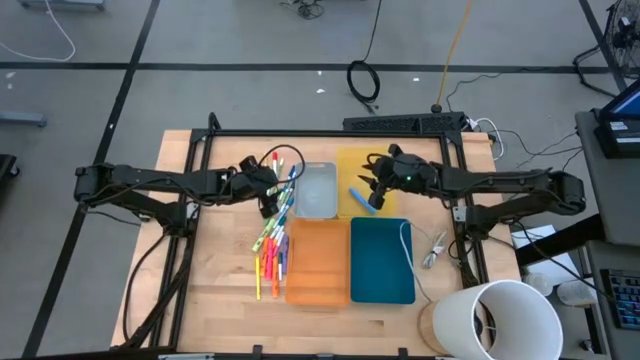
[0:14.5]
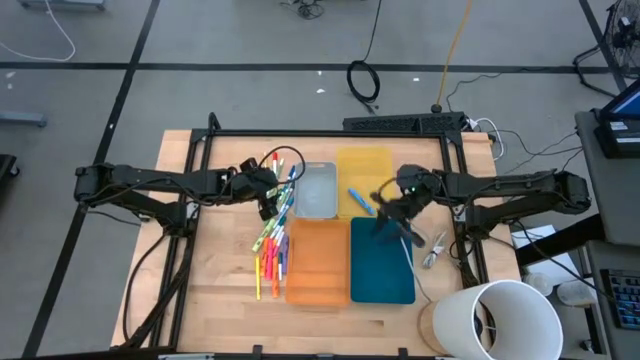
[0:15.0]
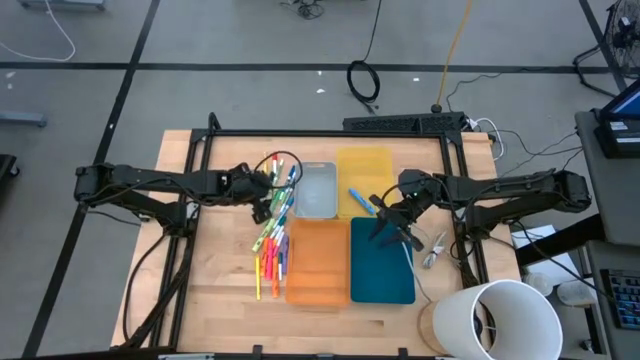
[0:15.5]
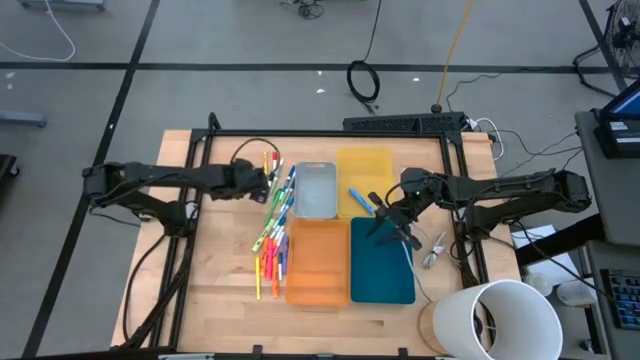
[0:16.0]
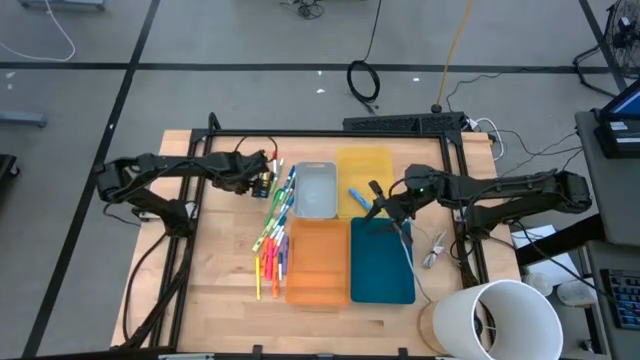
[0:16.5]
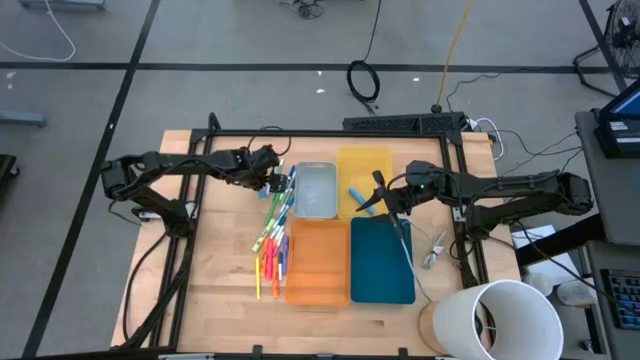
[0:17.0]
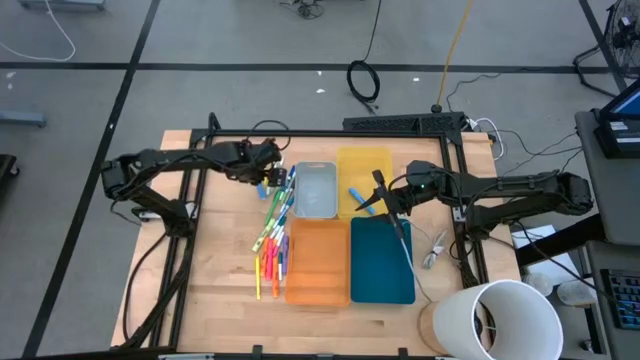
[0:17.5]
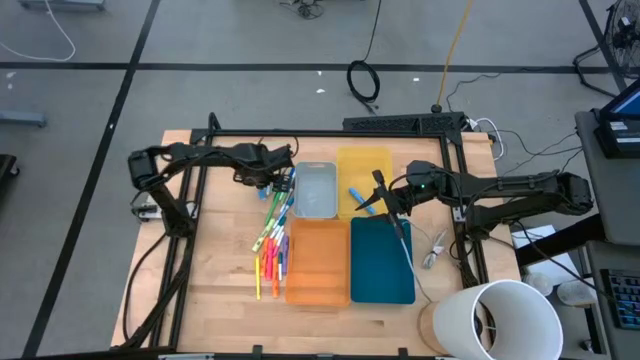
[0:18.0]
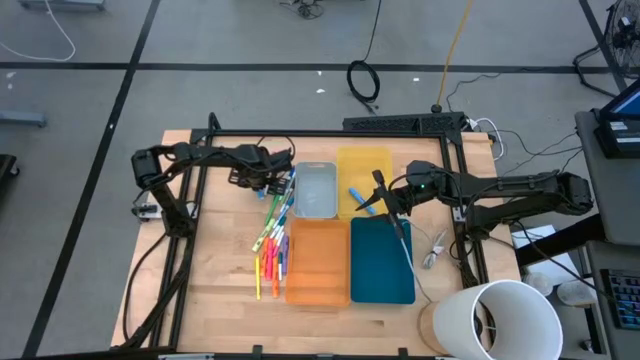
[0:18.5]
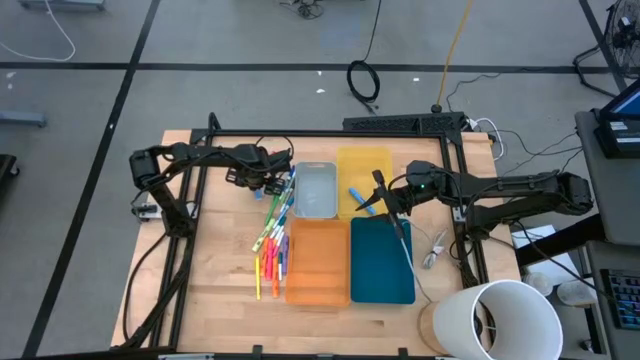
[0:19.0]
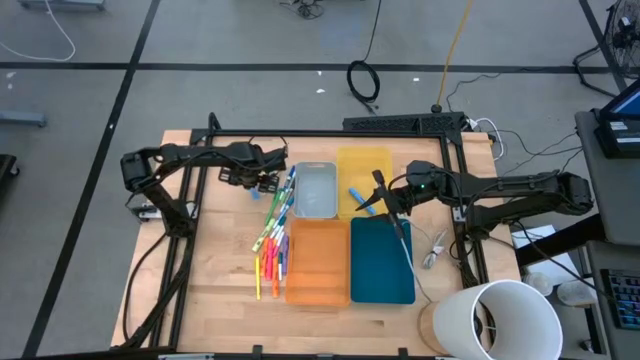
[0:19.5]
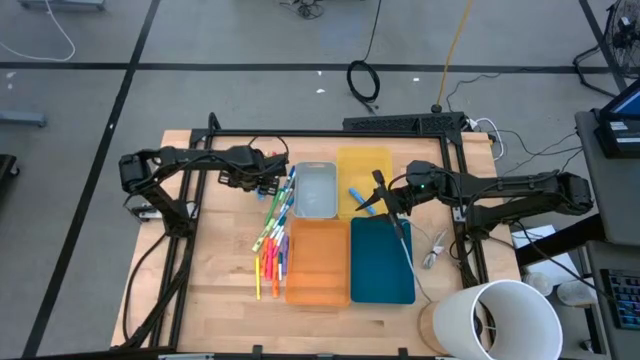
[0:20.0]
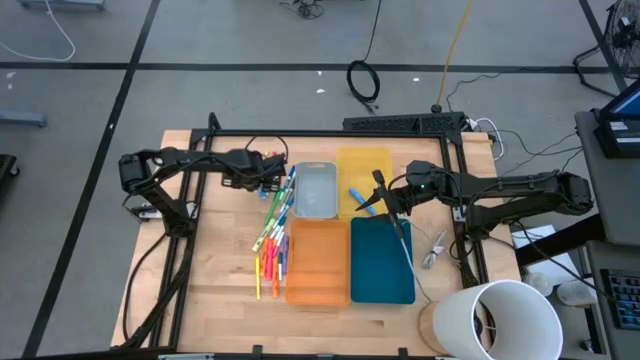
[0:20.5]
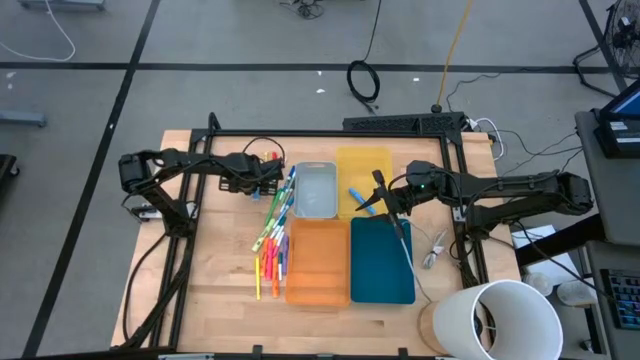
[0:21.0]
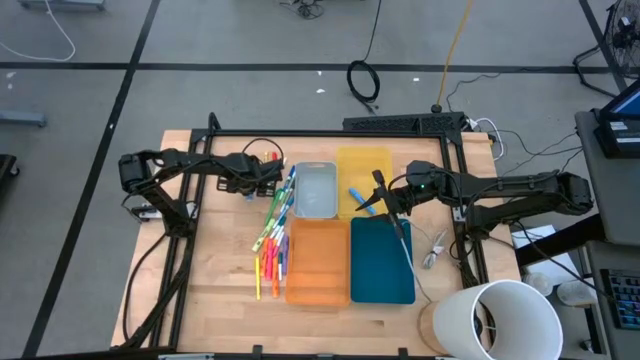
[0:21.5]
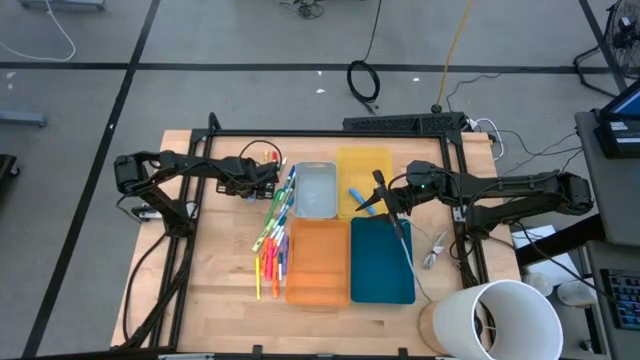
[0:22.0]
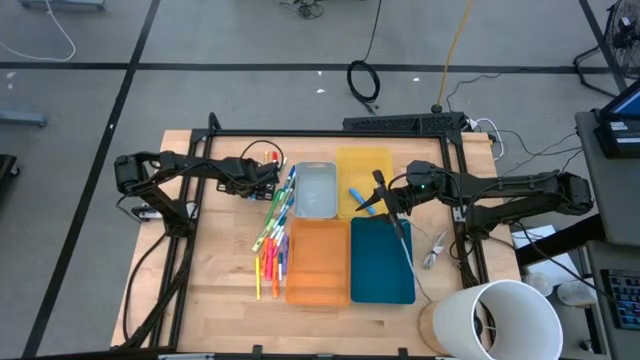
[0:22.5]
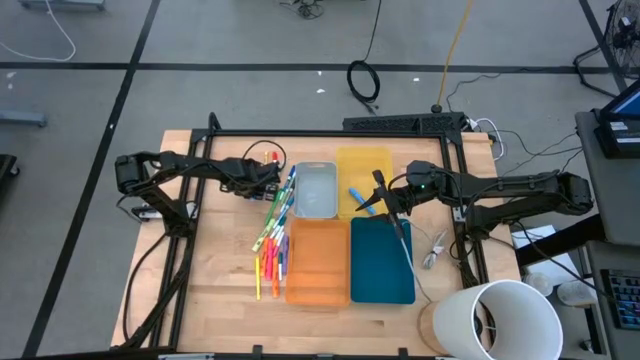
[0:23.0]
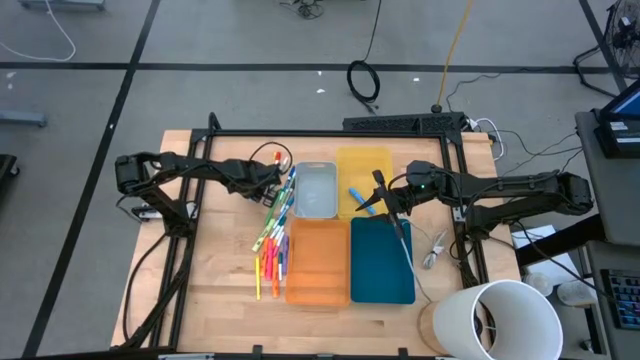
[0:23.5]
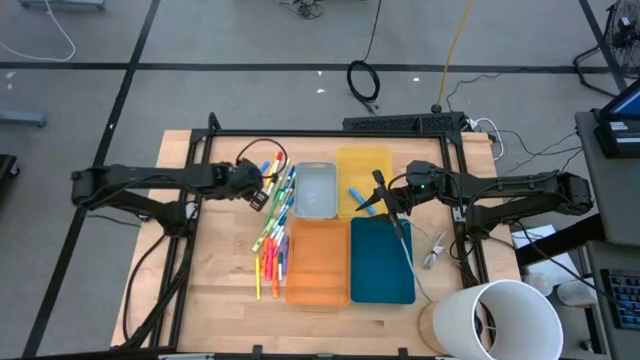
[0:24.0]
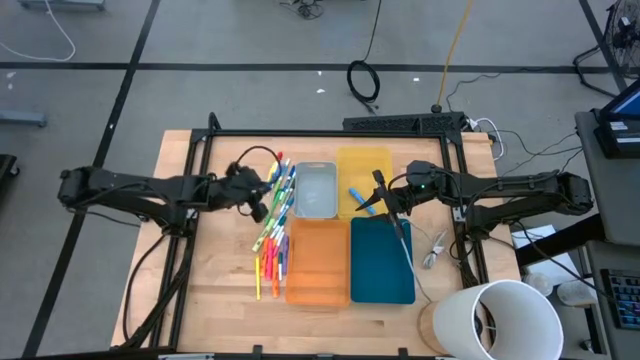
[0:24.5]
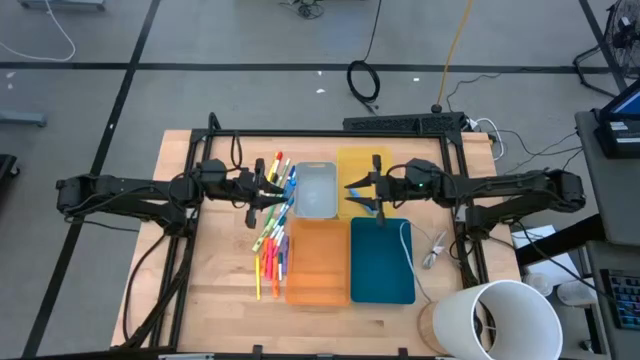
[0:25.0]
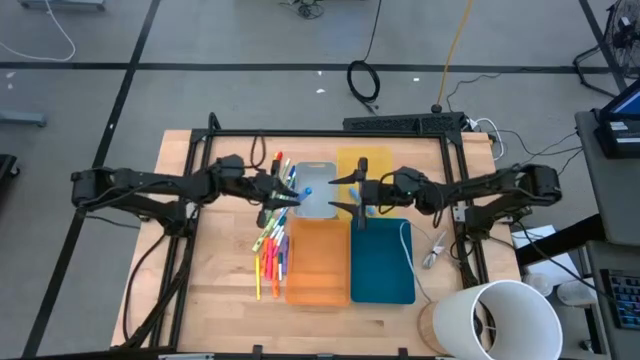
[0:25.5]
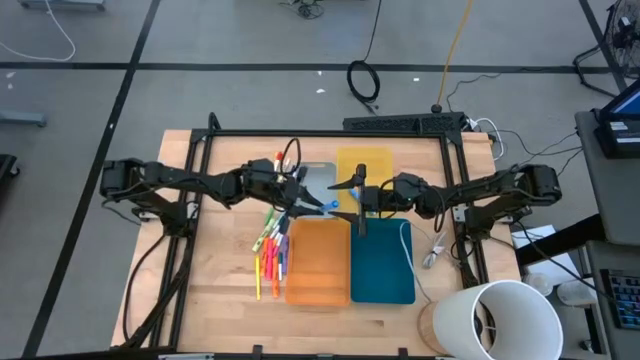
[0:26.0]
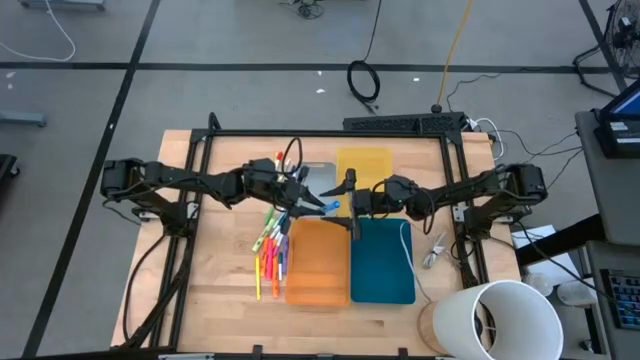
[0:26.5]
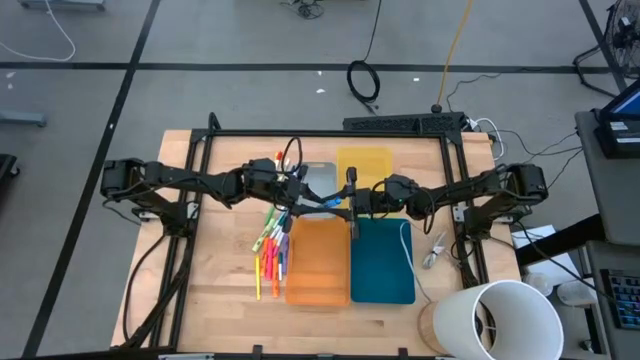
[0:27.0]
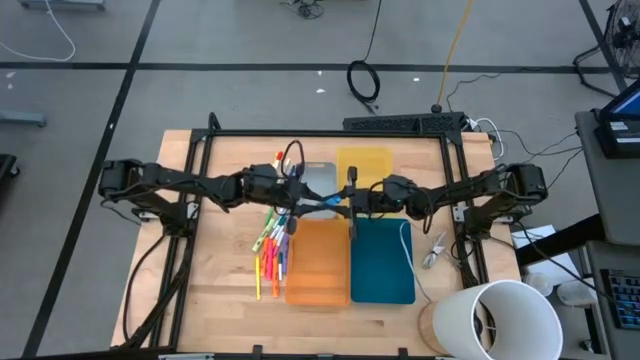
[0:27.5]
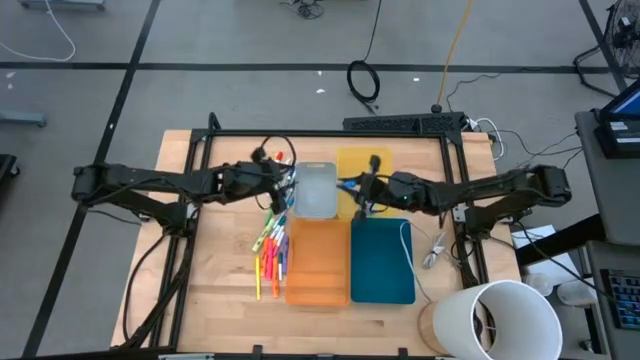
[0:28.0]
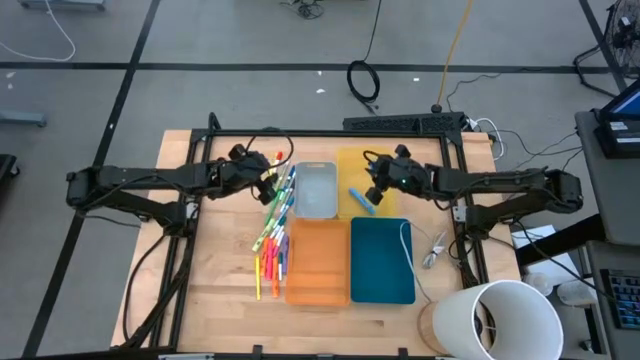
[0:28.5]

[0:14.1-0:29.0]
Task: Pick & Place Markers
Put the blue highlighter pen into the yellow bin

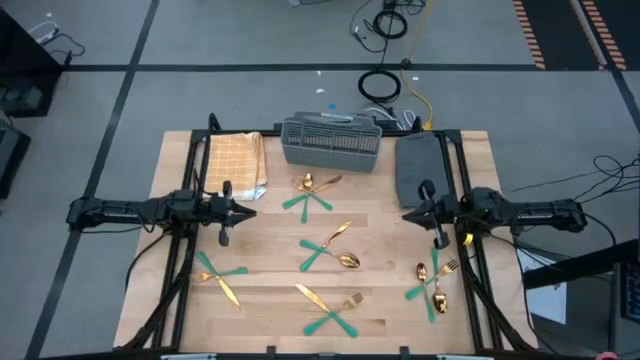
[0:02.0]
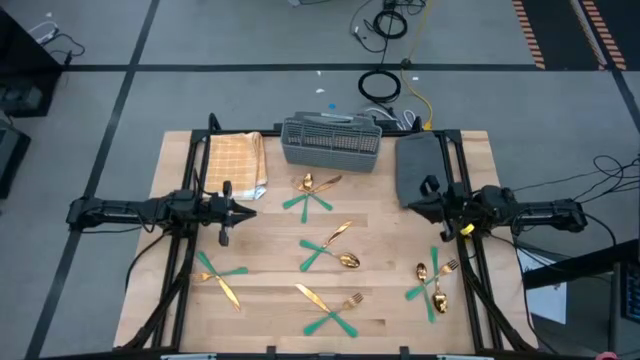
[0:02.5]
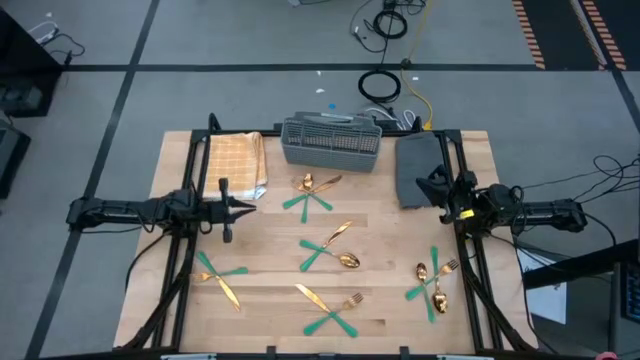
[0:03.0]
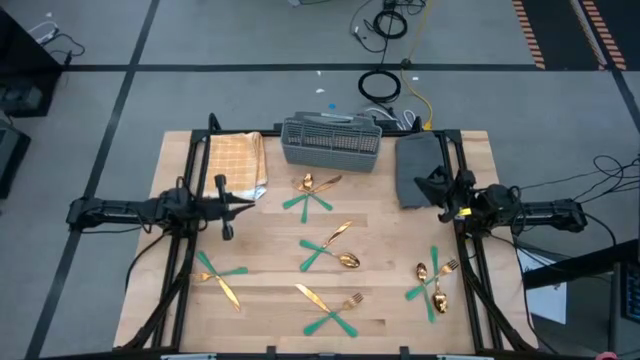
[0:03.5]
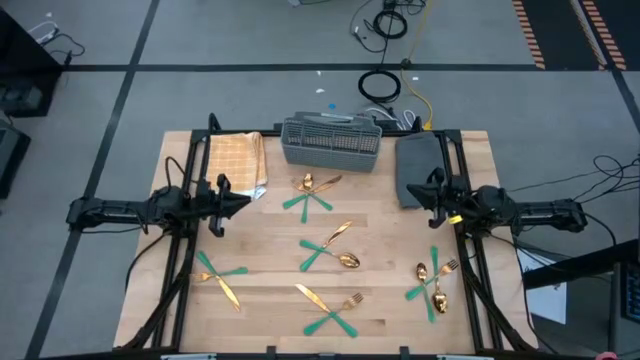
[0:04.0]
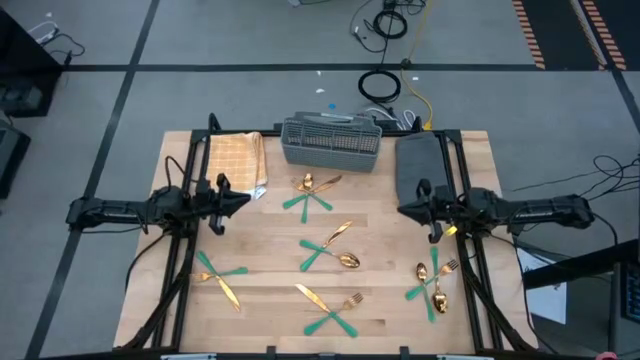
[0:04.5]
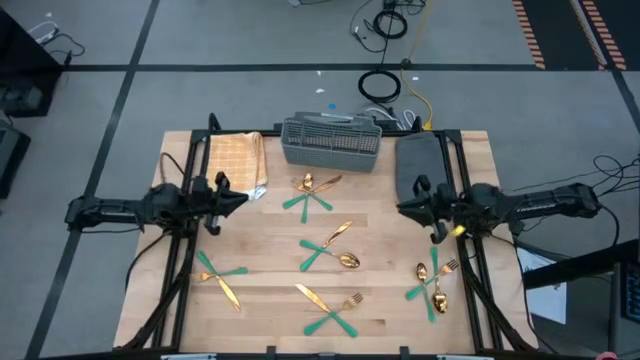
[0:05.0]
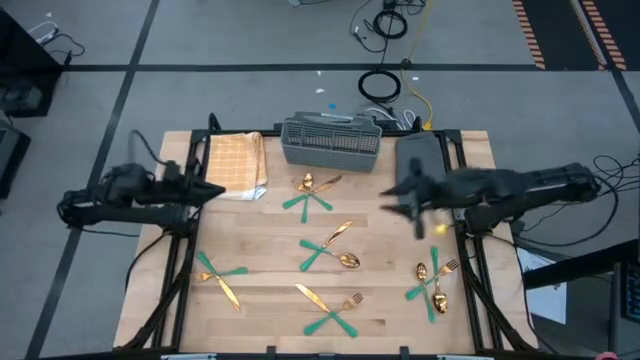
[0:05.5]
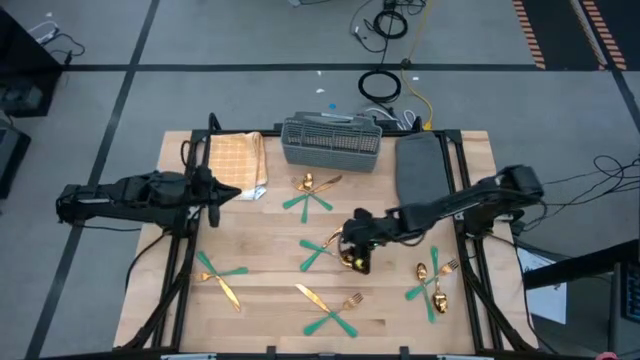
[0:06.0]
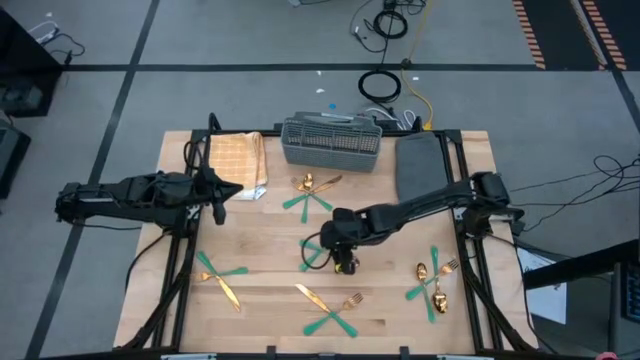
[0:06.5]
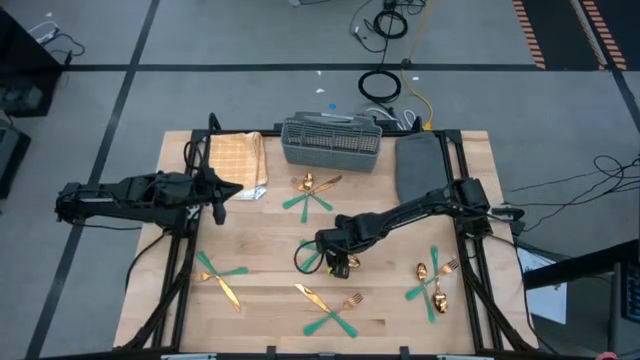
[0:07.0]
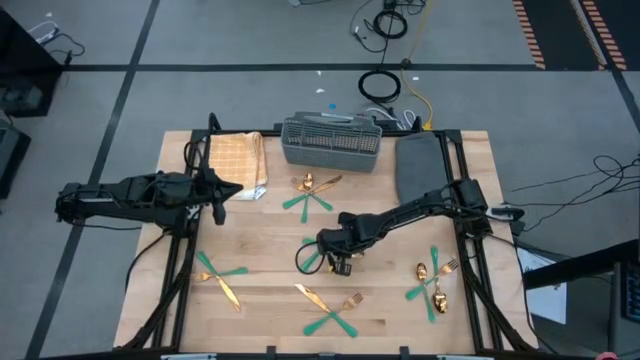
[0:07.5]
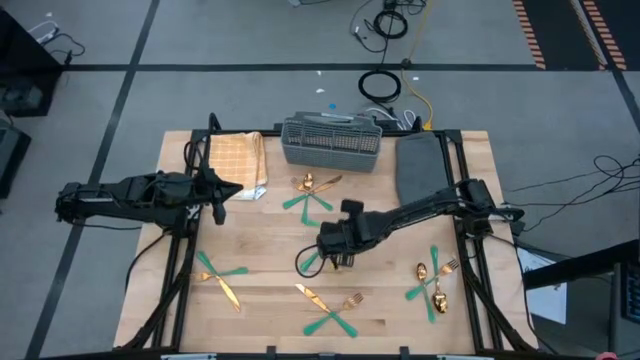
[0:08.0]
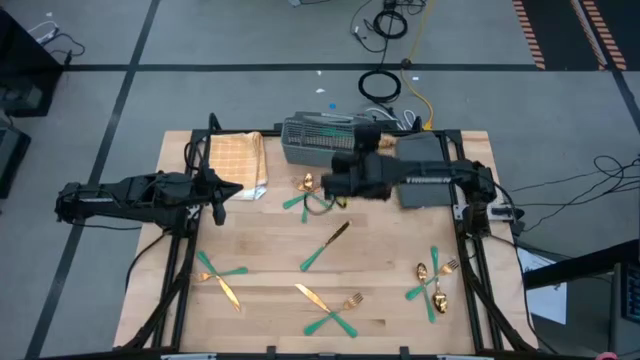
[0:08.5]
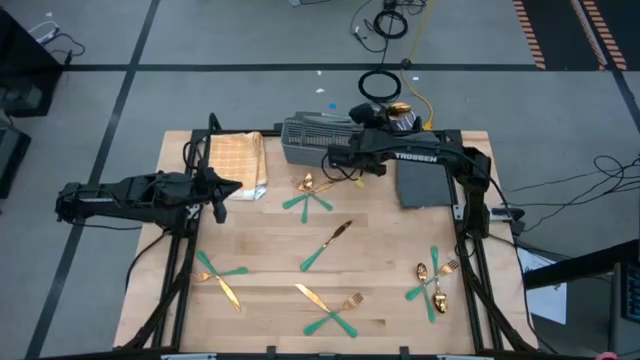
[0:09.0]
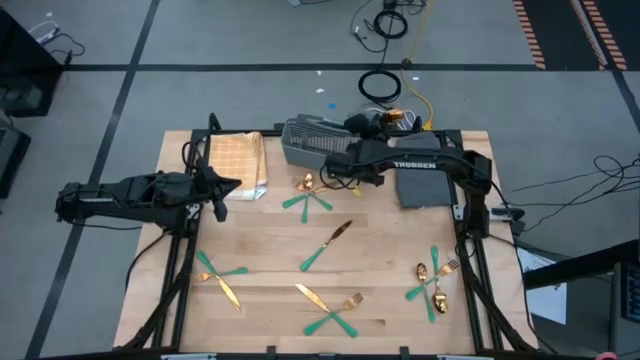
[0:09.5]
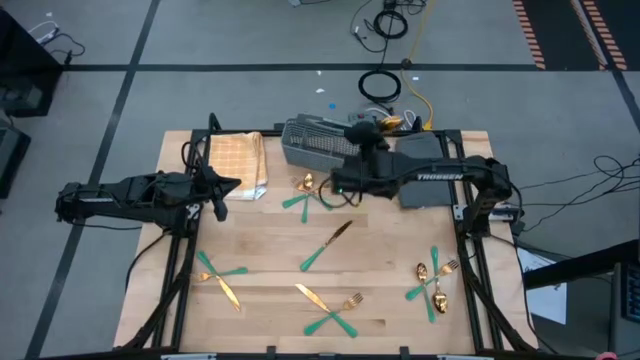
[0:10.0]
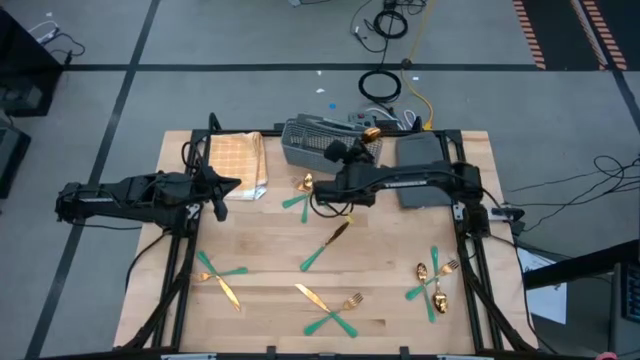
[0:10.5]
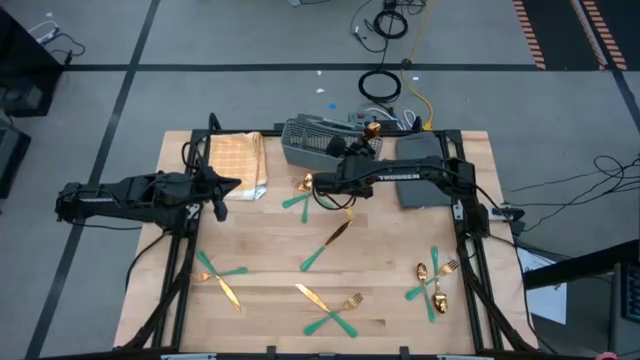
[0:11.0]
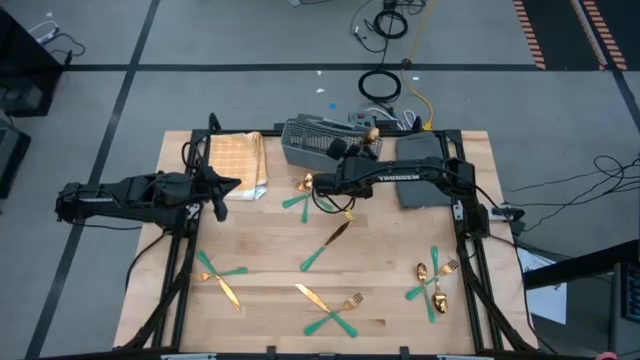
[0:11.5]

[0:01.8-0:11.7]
Task: Sort silverware
Put the spoon into the middle right section of the dish rack
